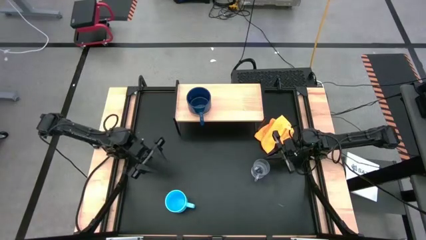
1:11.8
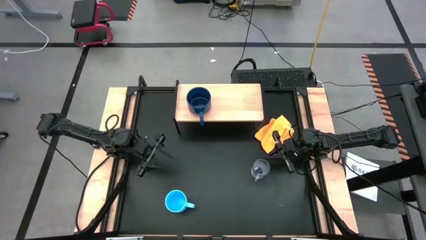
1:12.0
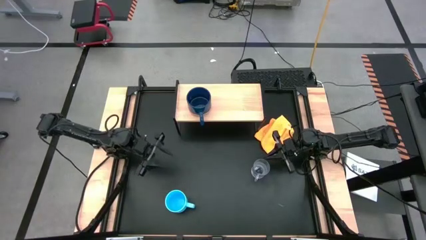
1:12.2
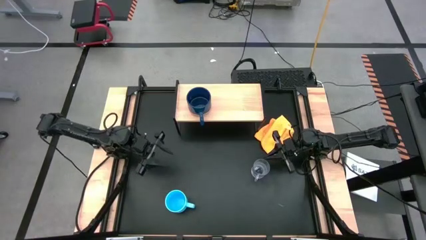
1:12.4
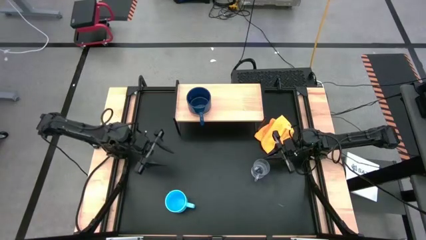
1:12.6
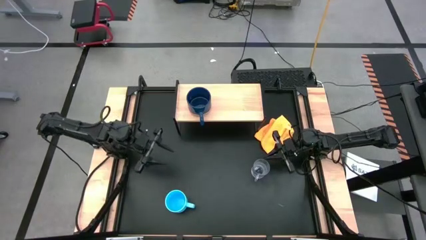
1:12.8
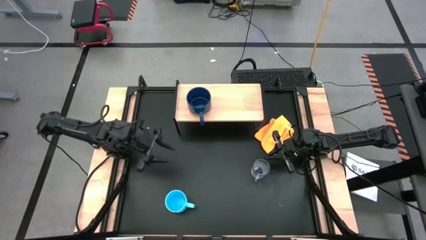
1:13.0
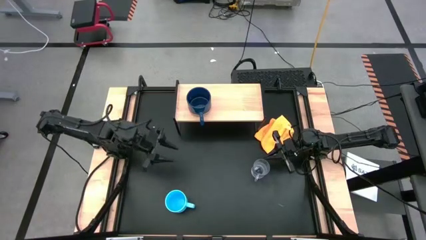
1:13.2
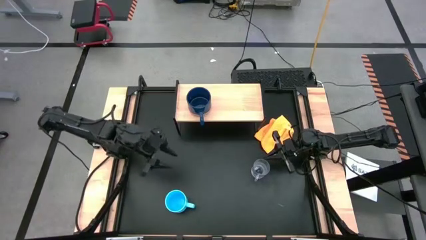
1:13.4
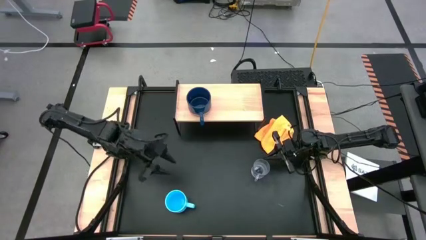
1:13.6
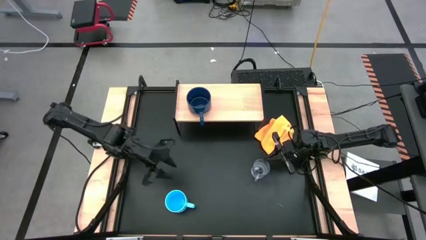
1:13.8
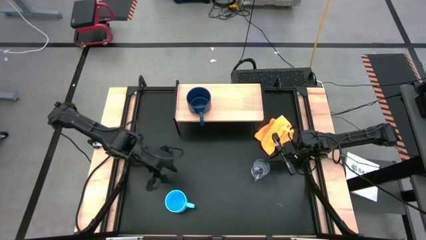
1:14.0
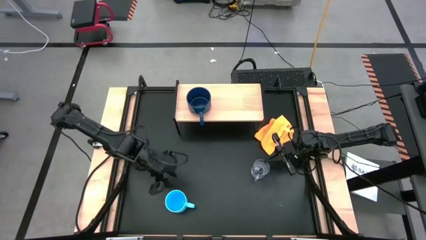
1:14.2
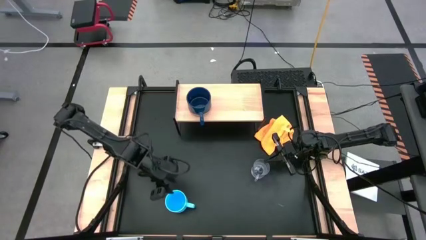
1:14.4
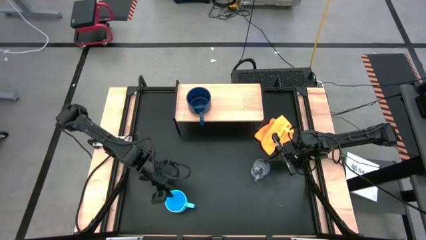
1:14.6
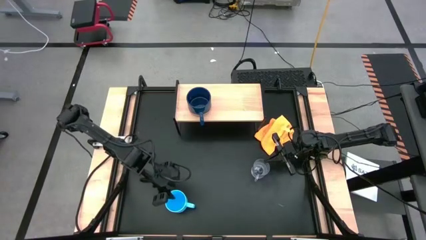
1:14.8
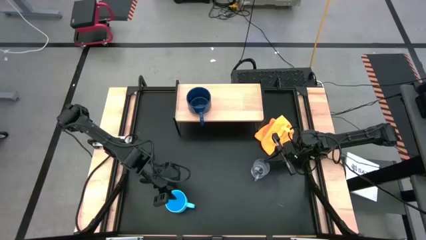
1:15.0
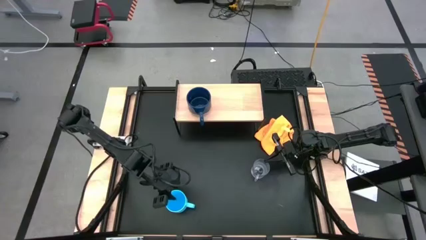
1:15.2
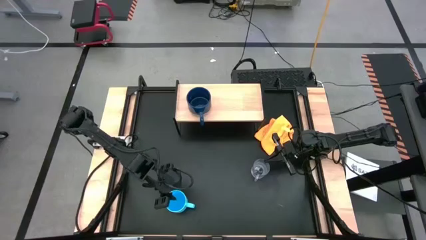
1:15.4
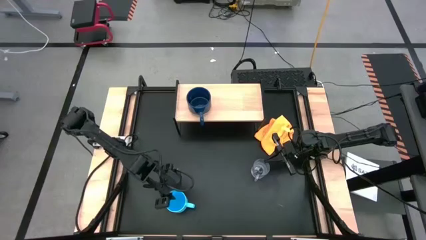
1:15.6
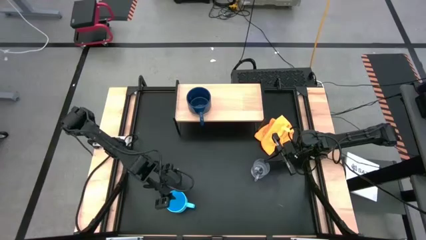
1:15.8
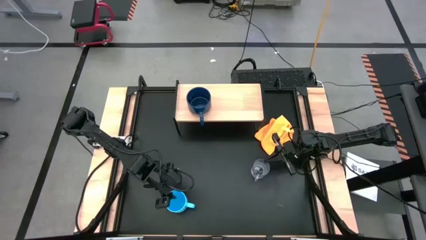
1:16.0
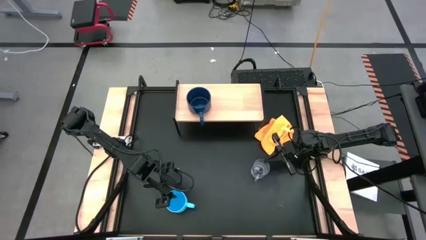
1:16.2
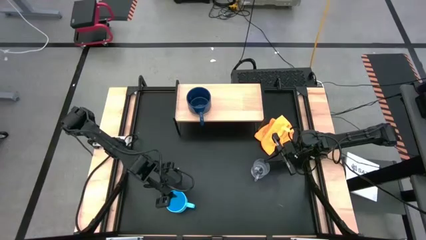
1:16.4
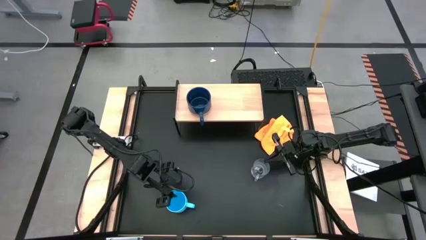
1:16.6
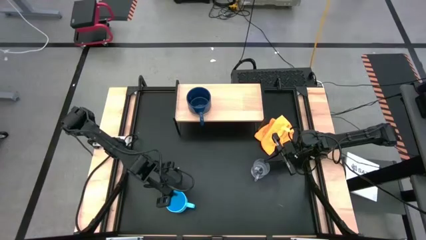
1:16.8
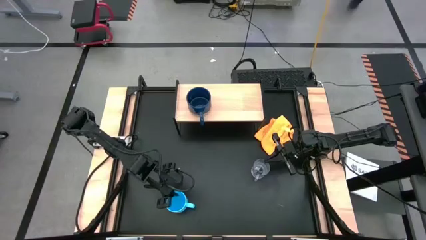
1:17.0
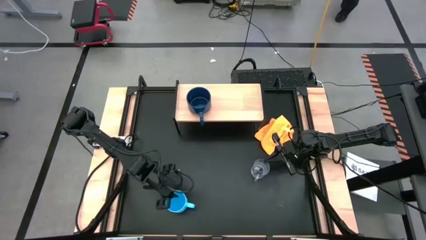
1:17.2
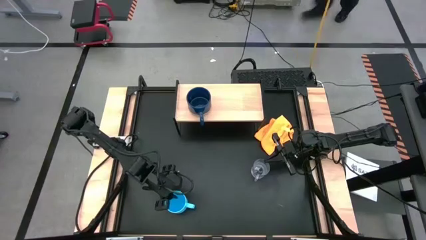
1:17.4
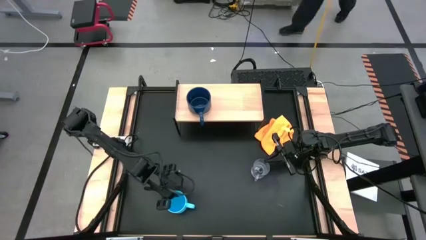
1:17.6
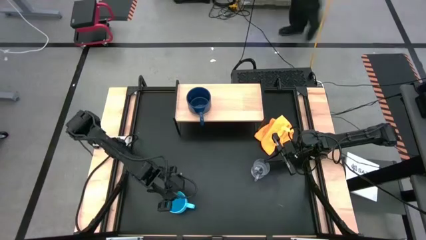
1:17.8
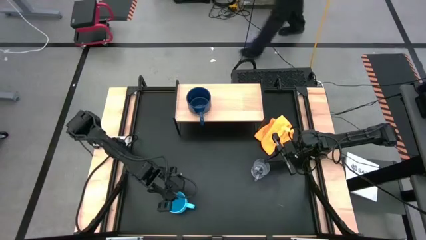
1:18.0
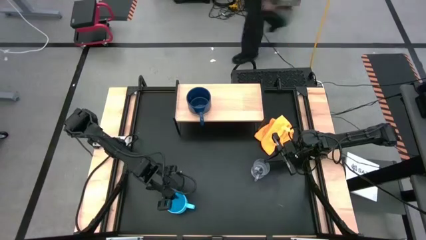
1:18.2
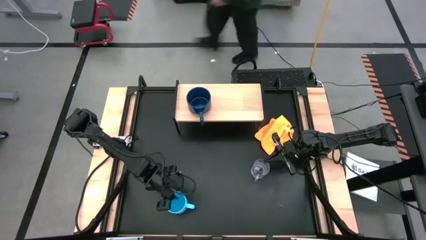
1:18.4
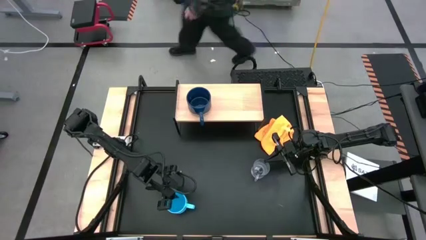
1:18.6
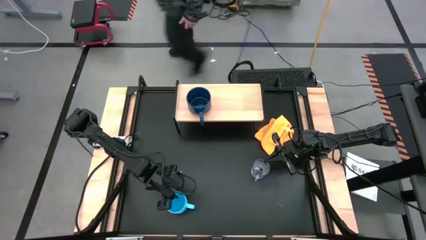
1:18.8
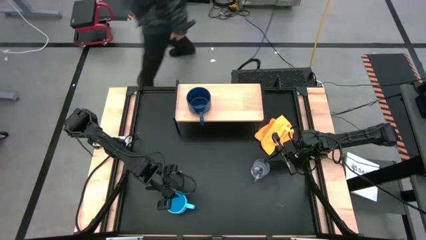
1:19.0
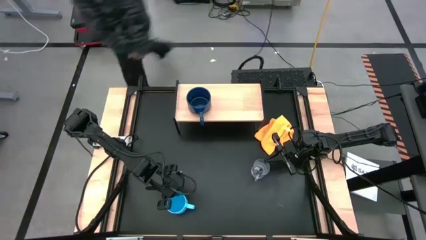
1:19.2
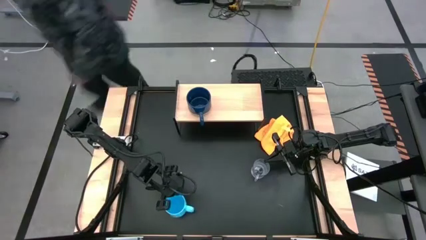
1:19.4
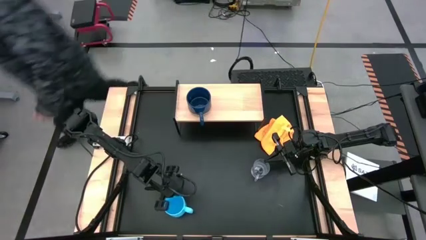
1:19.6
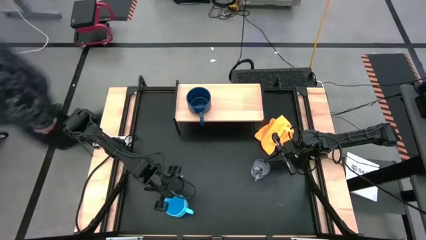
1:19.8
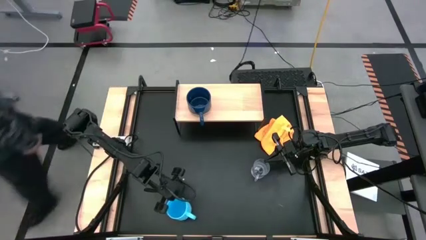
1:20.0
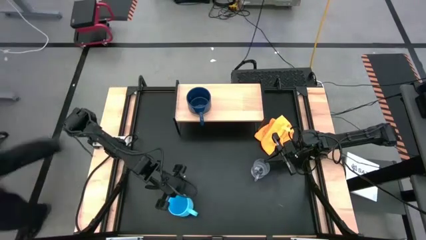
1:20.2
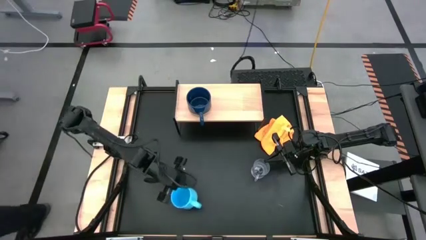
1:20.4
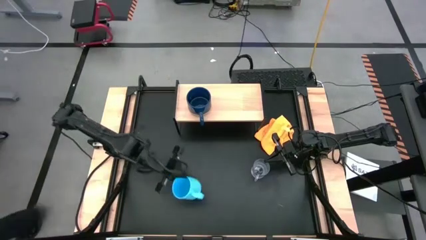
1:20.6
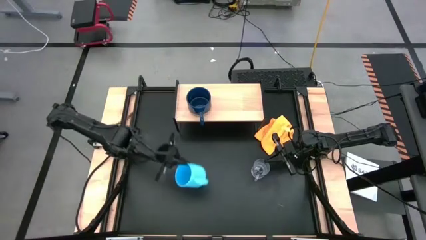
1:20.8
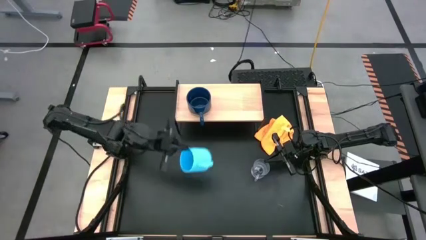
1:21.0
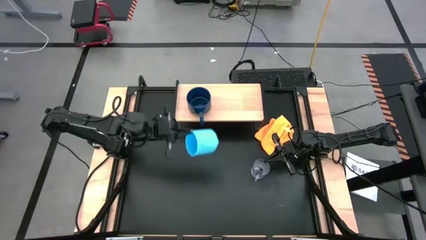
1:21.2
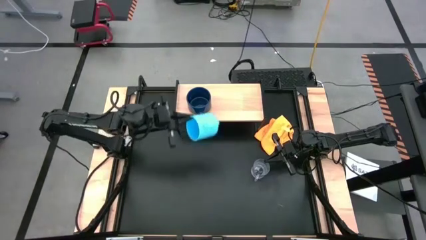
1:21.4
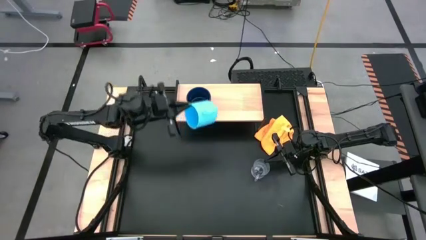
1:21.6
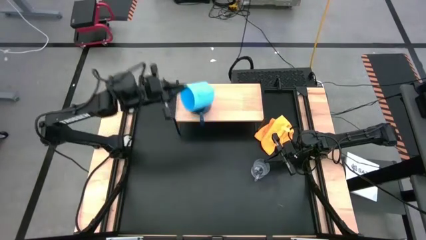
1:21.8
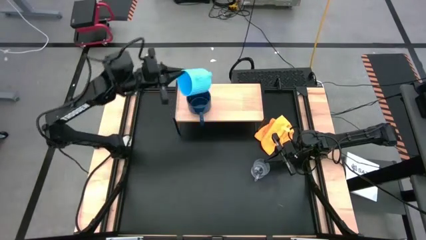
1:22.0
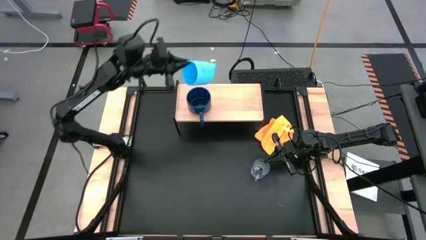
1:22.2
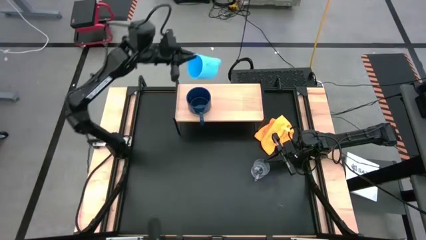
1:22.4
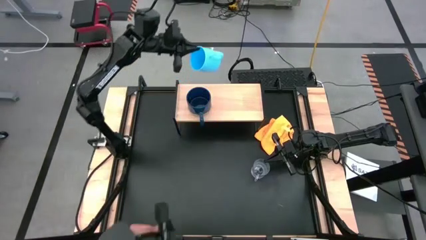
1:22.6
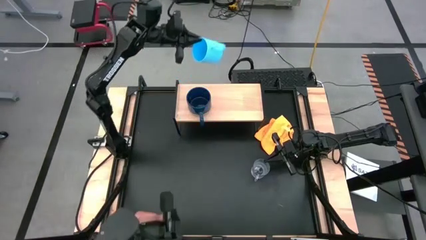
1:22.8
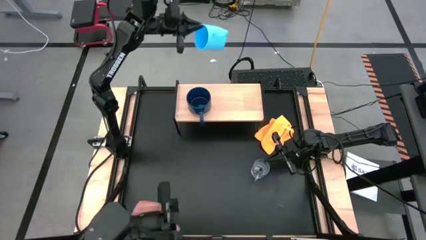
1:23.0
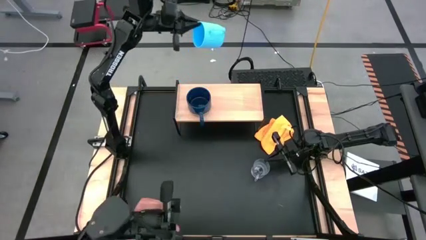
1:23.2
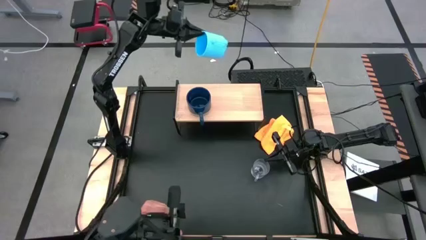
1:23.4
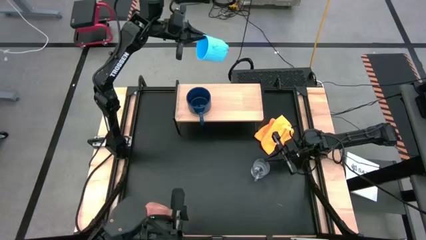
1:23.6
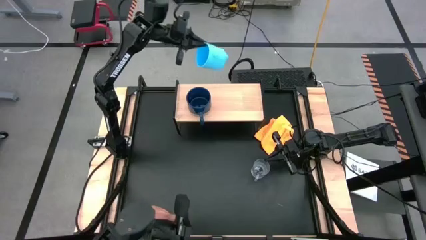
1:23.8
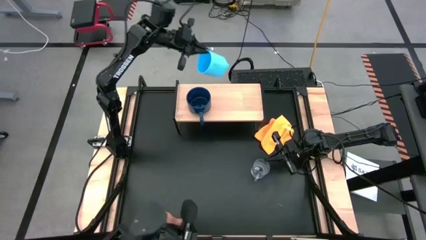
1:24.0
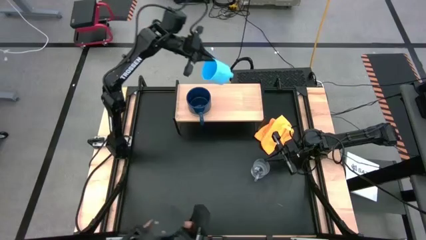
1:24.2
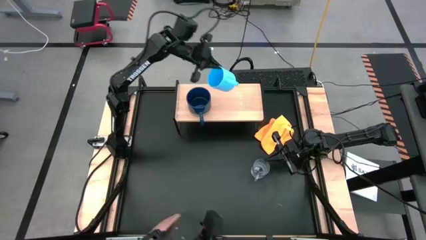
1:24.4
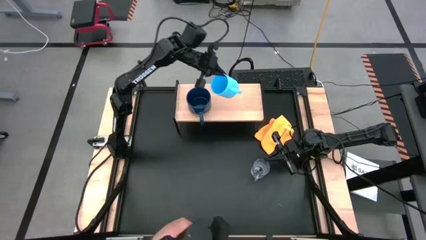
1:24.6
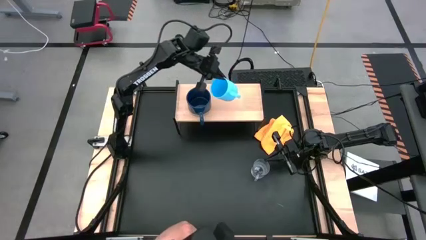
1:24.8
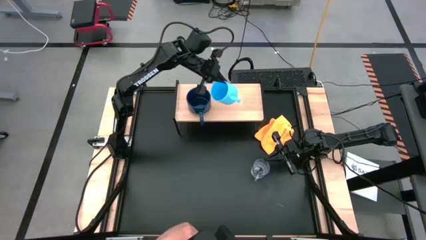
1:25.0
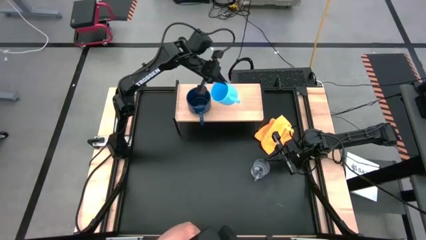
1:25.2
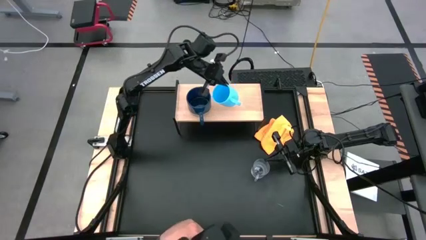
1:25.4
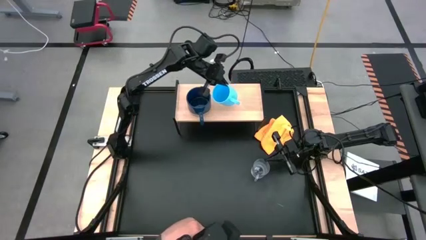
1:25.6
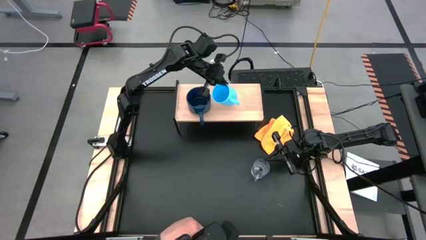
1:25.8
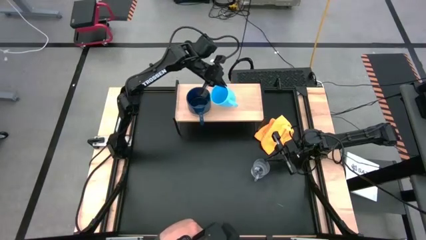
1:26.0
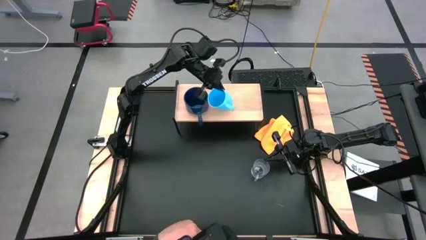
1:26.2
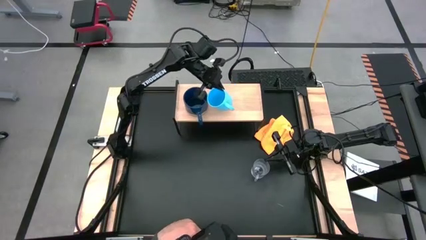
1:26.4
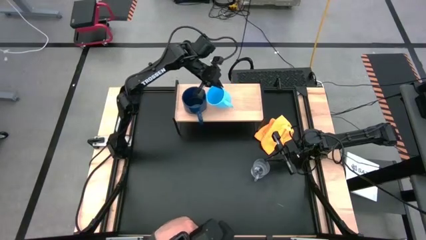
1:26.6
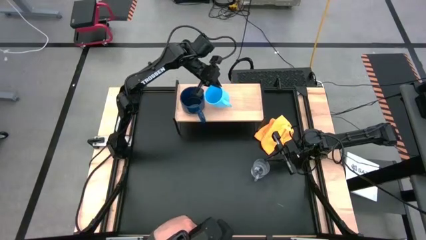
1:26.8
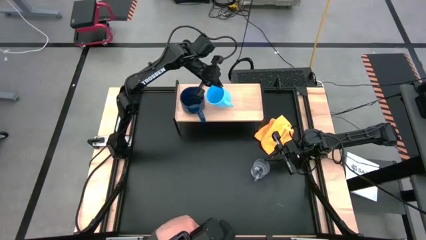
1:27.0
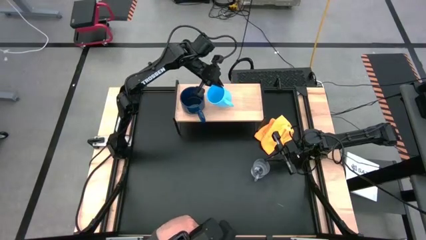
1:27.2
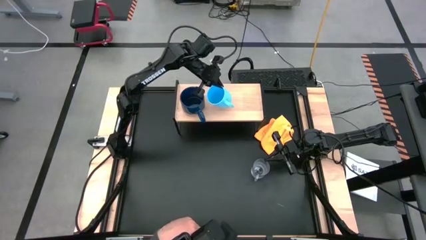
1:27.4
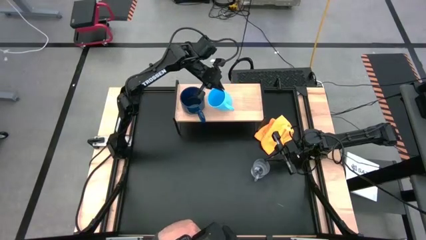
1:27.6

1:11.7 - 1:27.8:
Task: Stack small to large cups/mugs on shelf
Put the blue mug on the shelf
